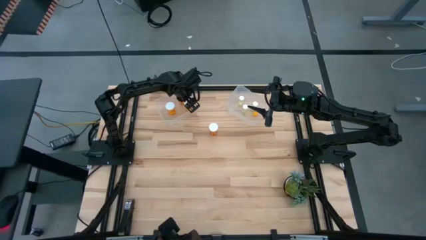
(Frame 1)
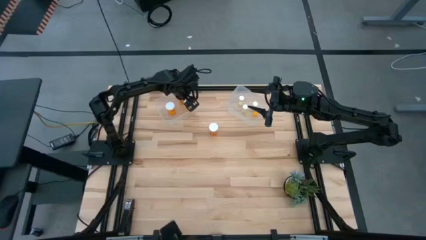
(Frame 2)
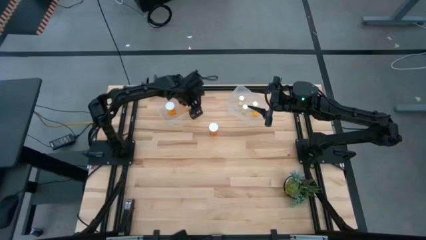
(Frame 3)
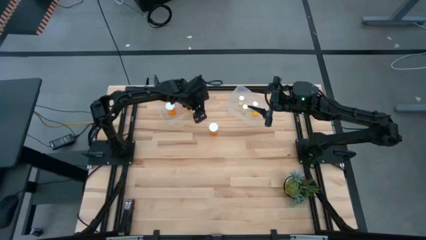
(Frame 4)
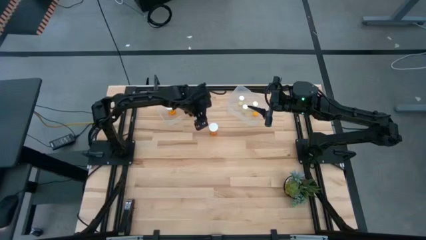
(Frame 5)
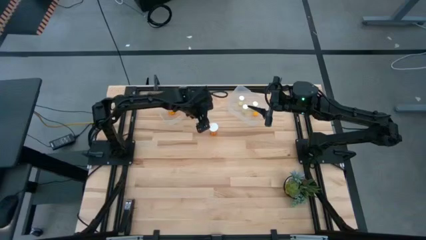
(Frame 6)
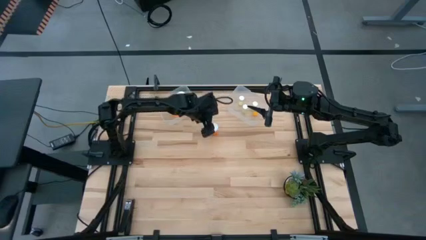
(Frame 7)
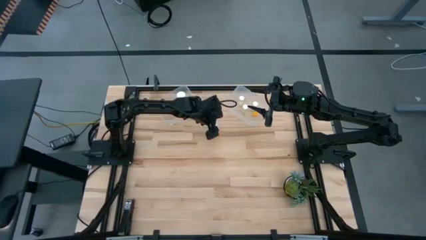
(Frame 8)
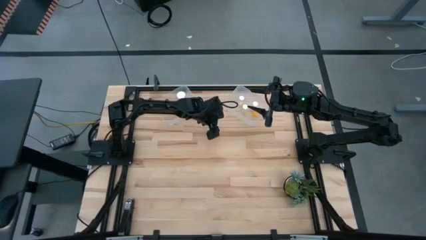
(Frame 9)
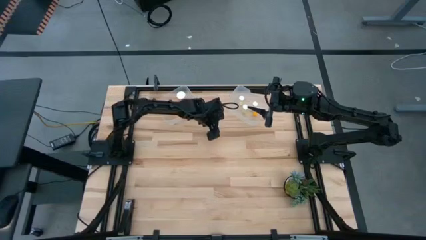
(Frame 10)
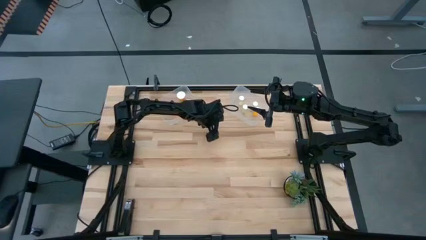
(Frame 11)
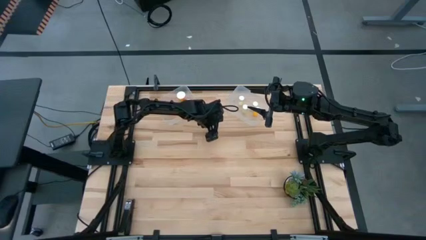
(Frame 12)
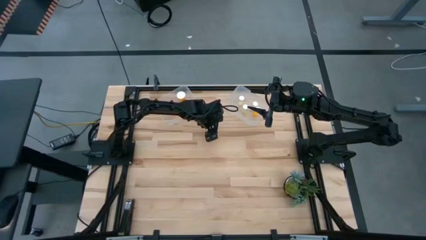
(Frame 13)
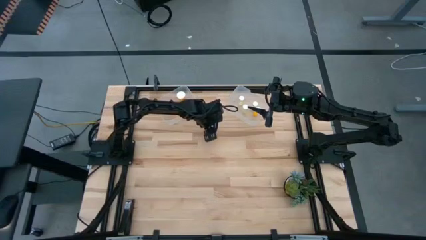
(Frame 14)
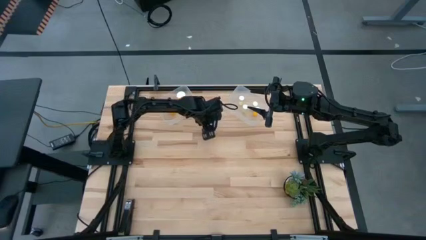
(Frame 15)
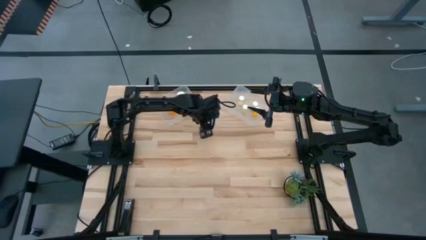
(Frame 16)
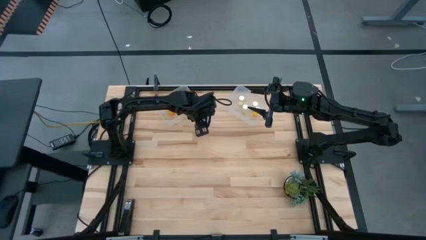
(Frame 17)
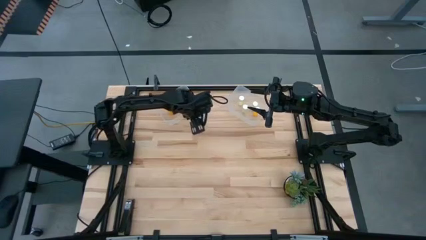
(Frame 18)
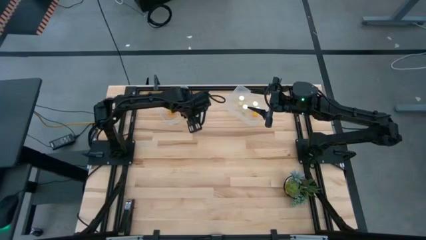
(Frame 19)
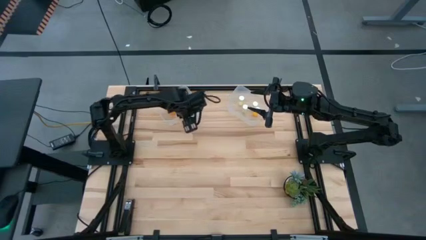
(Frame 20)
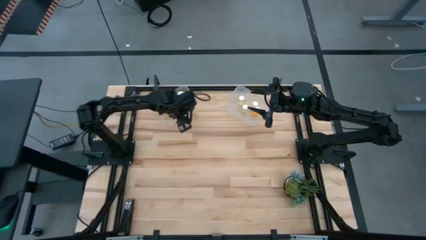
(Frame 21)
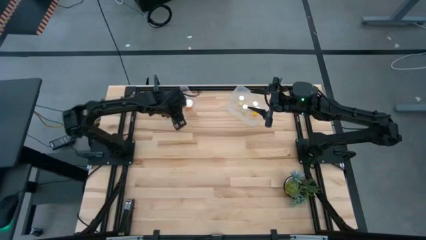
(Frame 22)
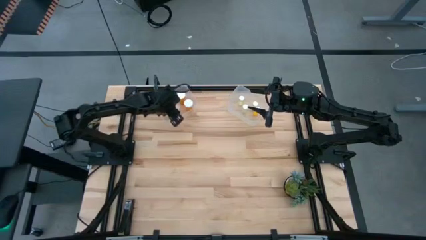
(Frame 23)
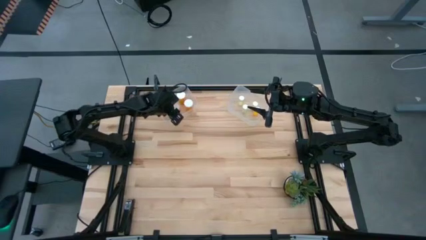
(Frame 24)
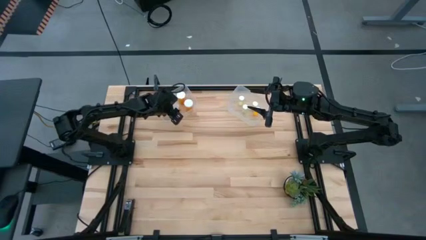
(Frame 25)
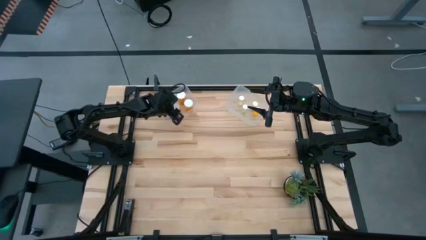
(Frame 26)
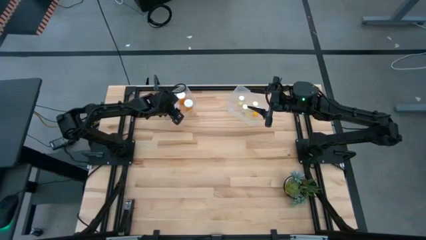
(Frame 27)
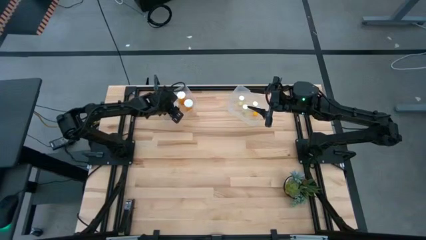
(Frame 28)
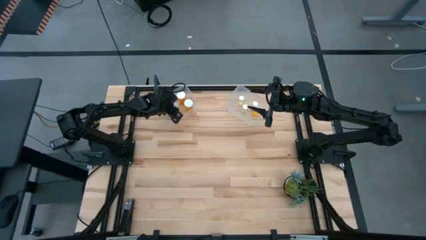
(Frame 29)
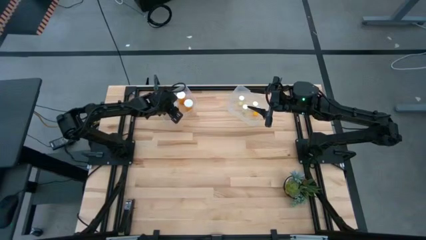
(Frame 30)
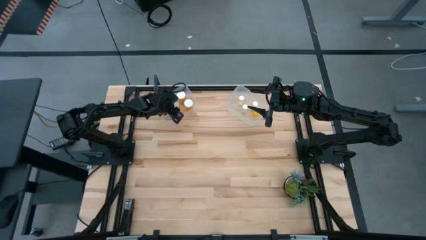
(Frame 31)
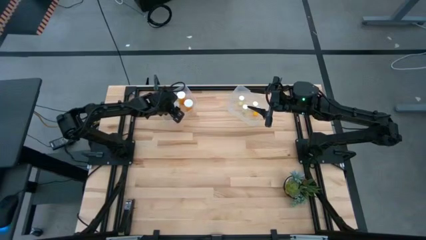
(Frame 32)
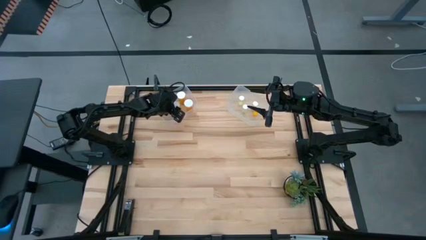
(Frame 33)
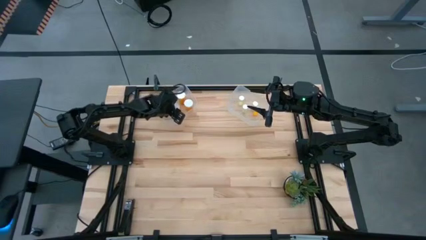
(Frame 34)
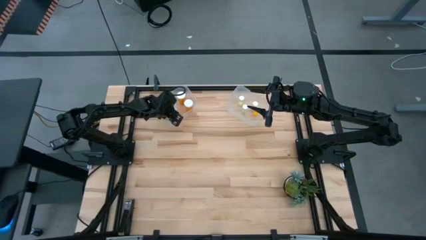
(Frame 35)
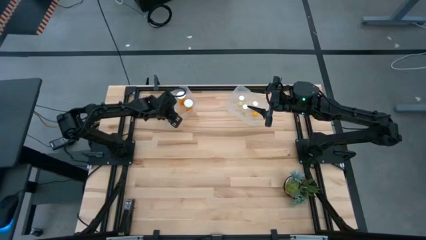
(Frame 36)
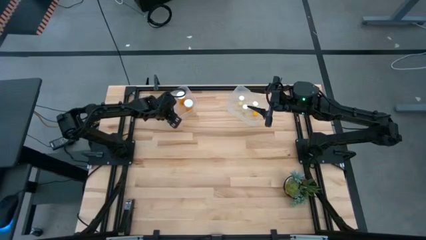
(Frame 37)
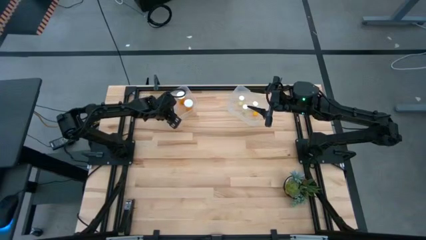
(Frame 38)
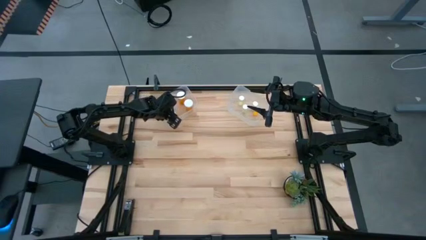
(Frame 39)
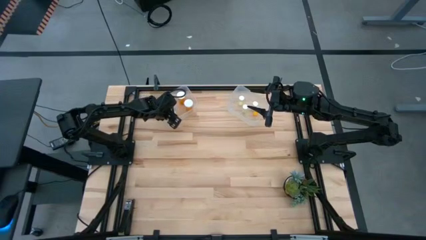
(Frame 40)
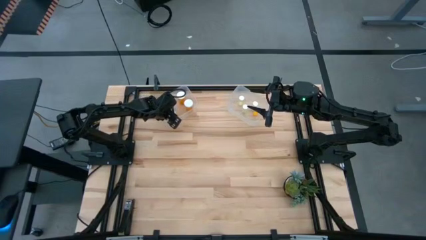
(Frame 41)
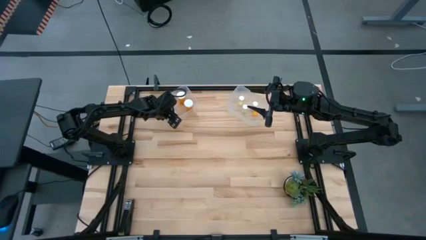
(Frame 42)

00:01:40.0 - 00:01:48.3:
Task: Pick and place medicine bottles into bin by pill shape (circle, oval)
Put the large orange medicine bottle into the left transparent bin
